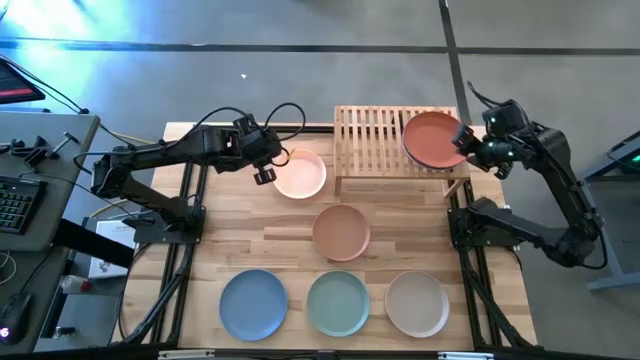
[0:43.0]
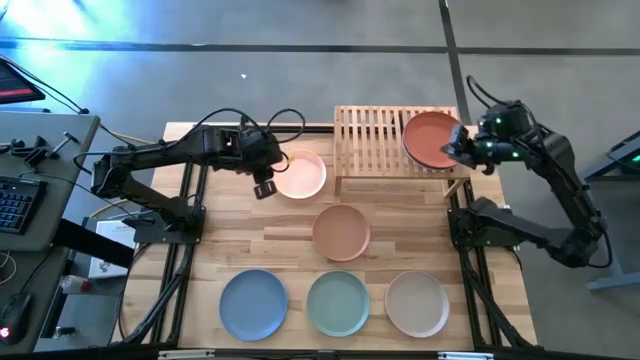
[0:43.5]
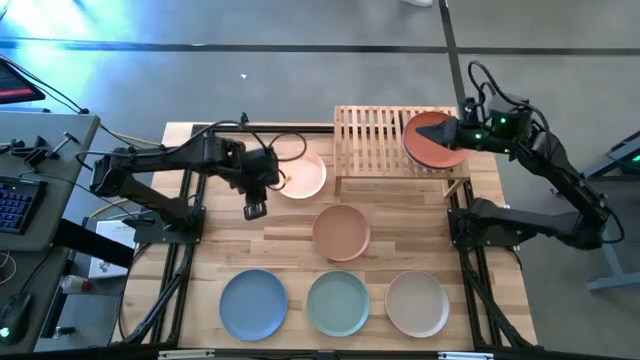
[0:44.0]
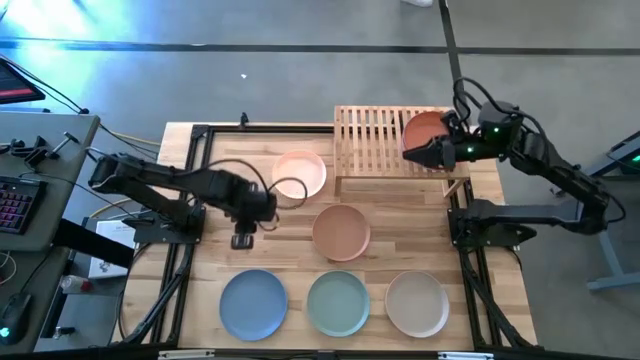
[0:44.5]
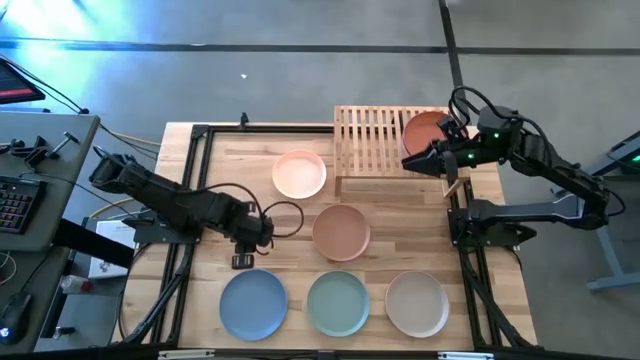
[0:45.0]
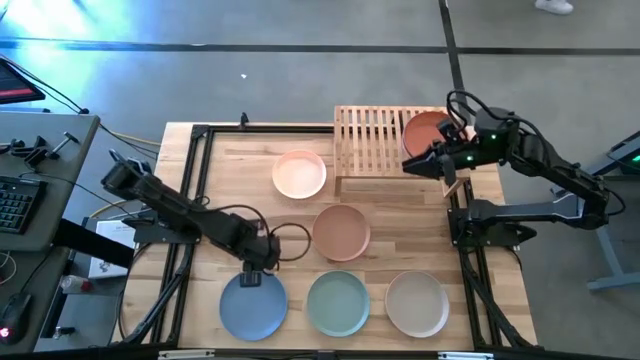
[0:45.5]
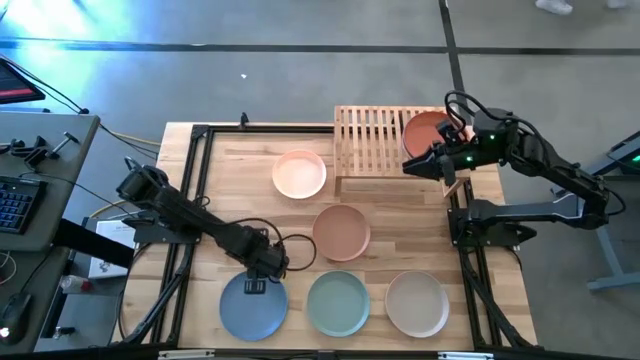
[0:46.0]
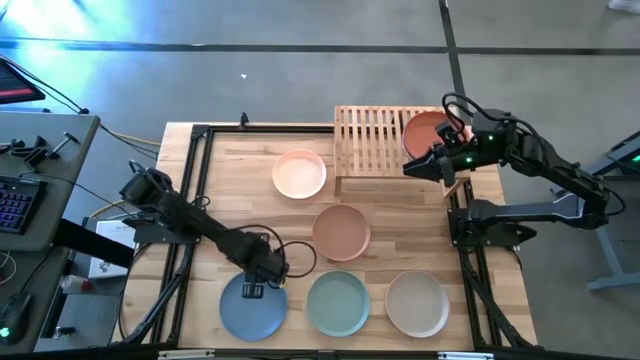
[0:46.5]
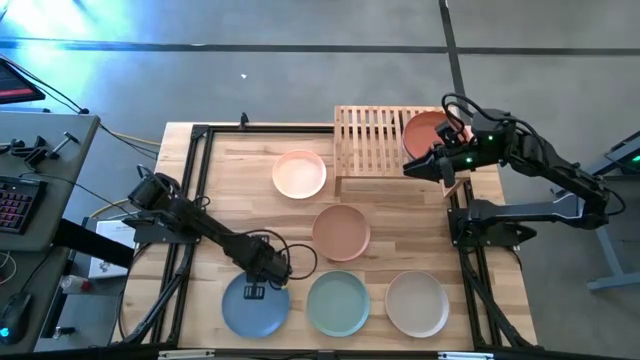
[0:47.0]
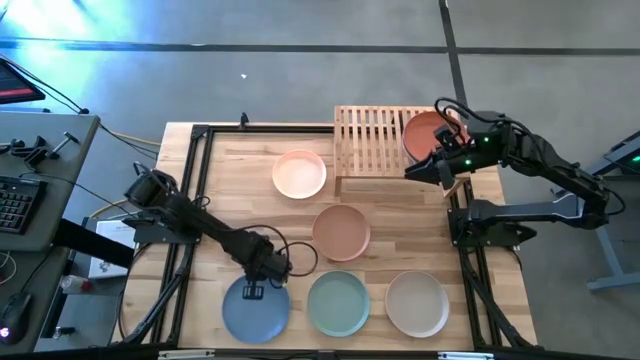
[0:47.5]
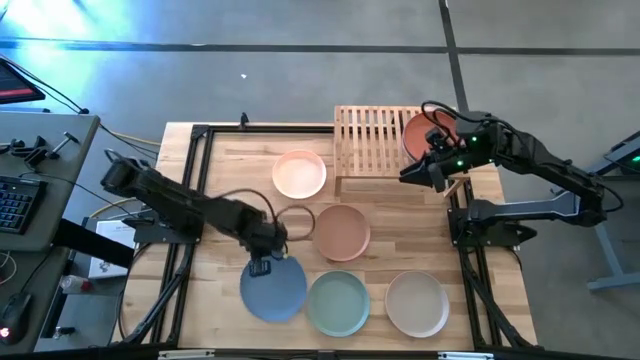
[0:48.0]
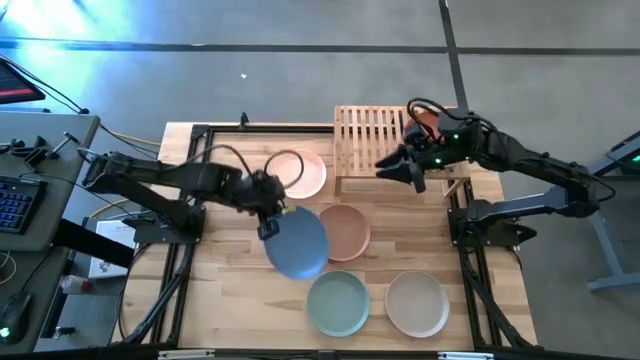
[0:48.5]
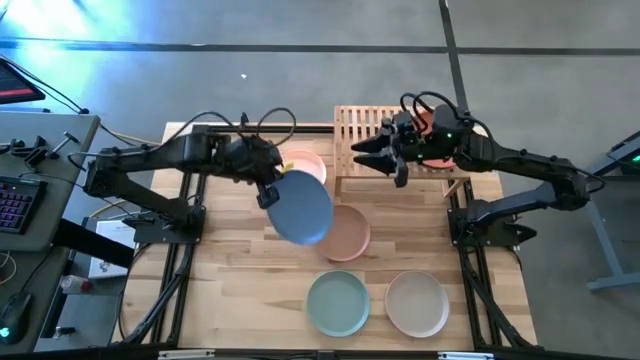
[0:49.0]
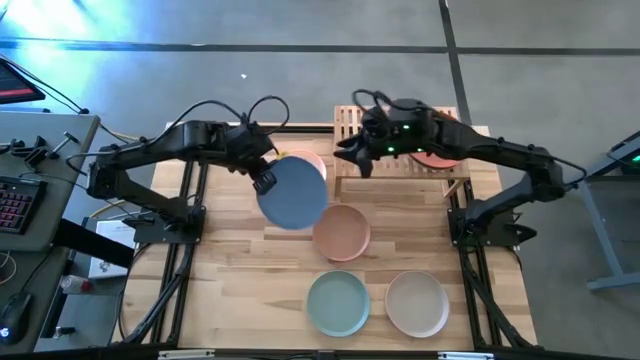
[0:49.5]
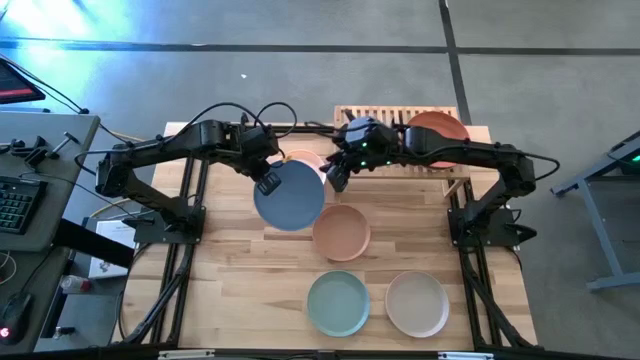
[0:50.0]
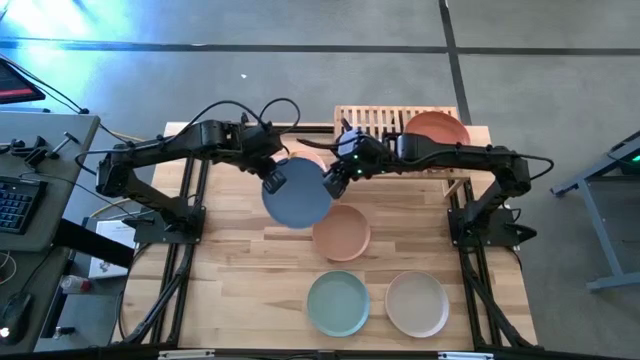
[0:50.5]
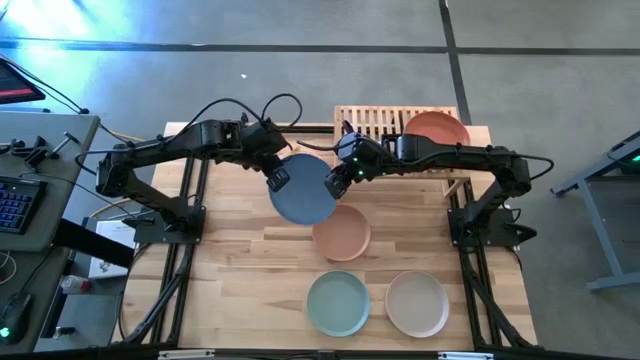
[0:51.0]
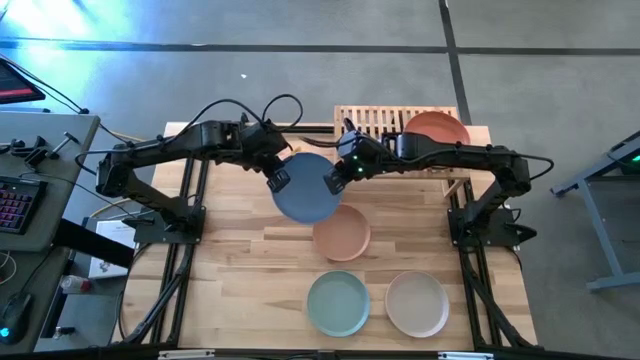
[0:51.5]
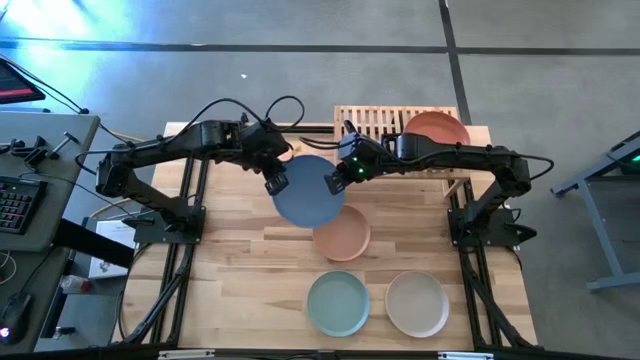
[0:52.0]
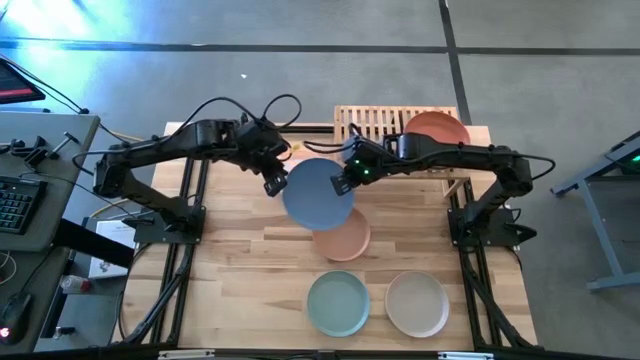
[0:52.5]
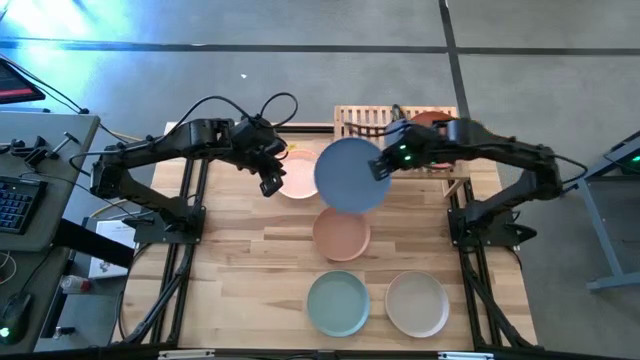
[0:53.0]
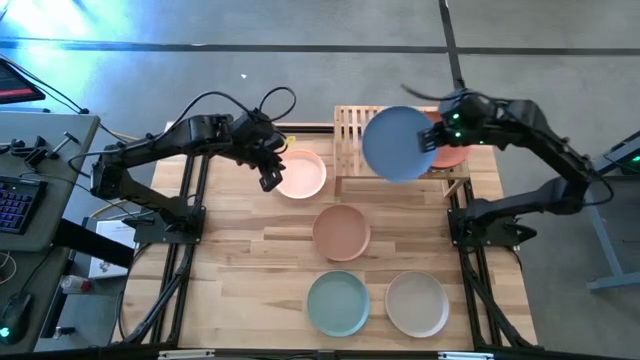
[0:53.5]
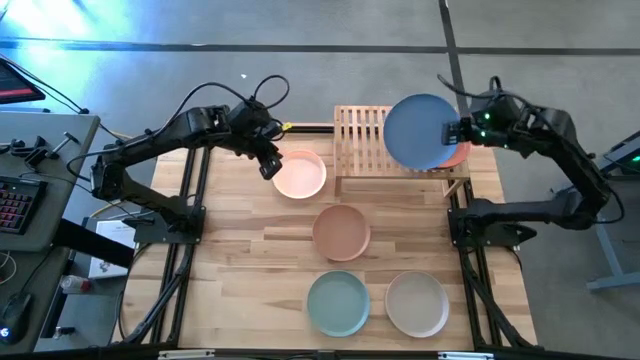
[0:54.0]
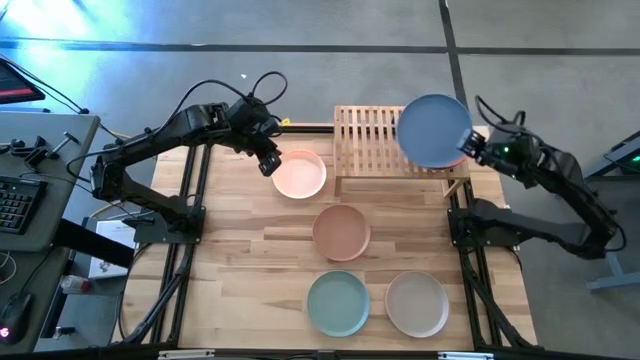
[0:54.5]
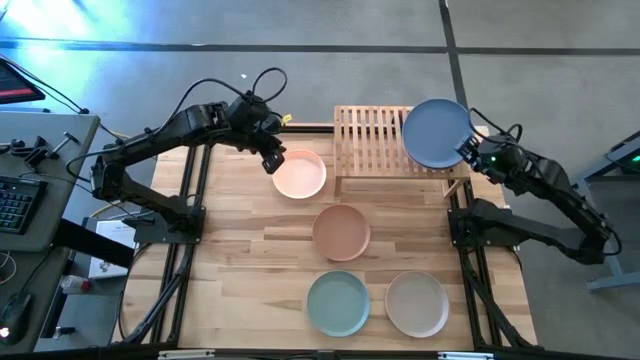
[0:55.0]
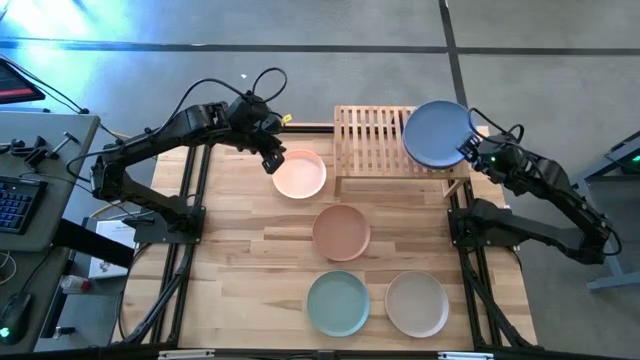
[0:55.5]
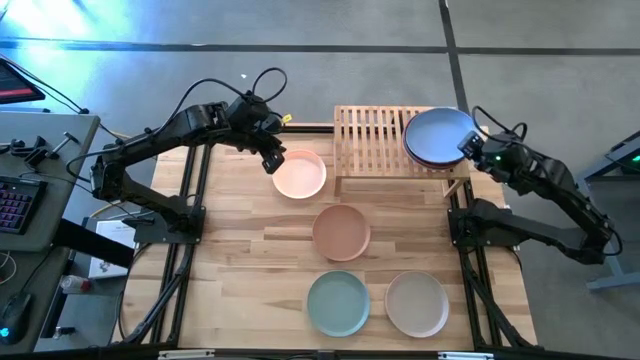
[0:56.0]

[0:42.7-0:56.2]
Task: Place and stack plates onto a shelf
Stack the blue plate on top of the orange plate on the shelf

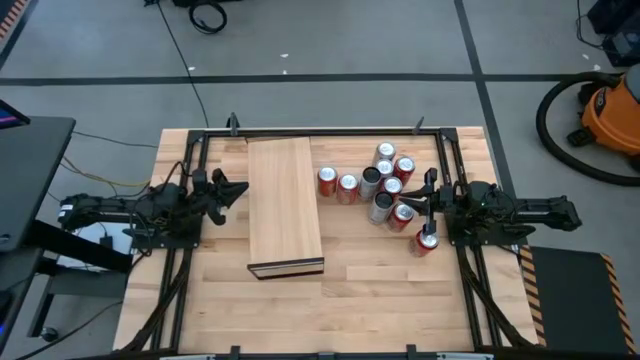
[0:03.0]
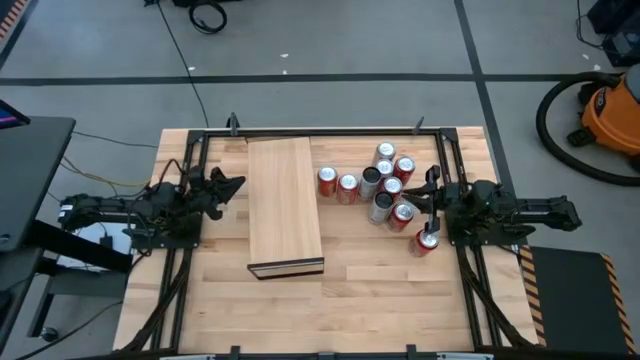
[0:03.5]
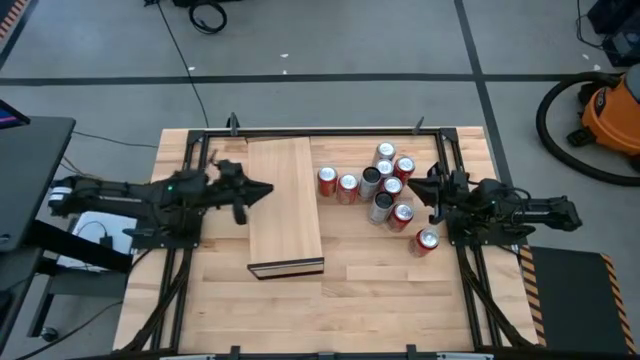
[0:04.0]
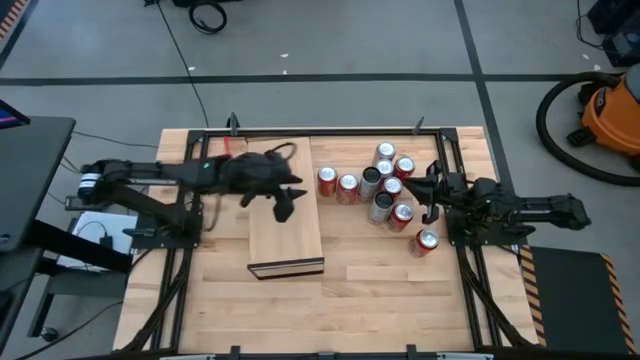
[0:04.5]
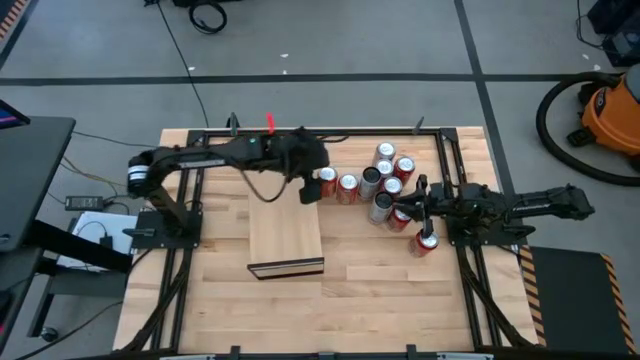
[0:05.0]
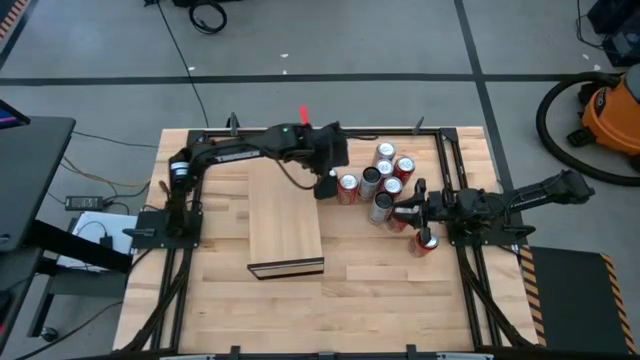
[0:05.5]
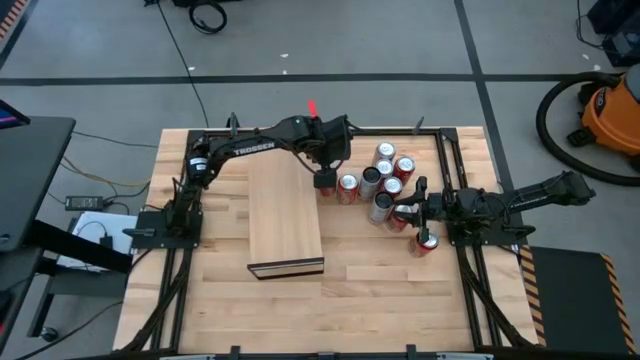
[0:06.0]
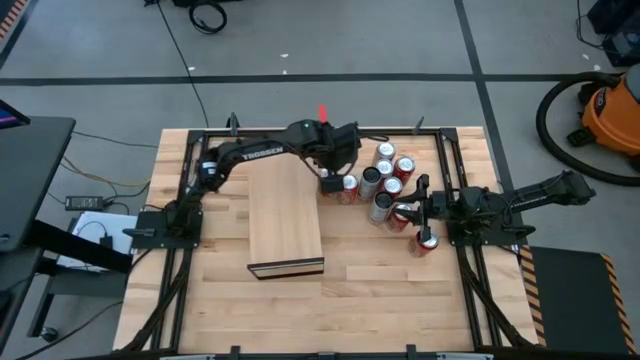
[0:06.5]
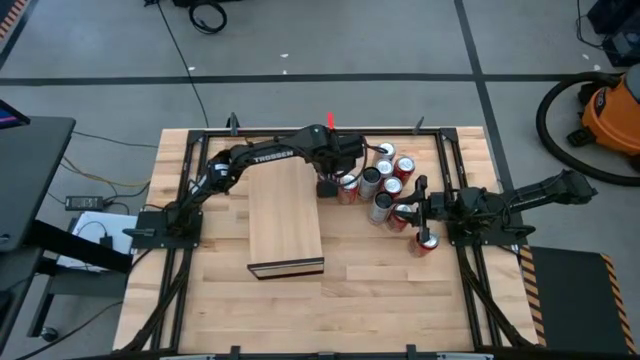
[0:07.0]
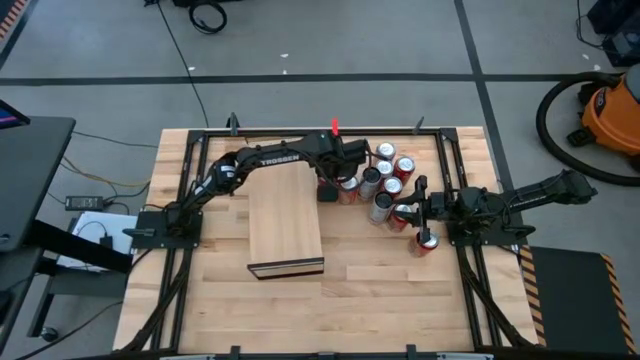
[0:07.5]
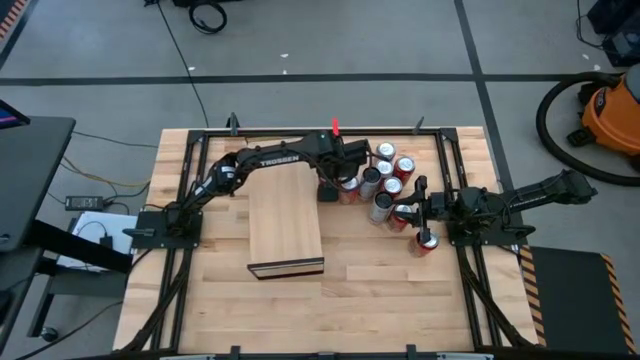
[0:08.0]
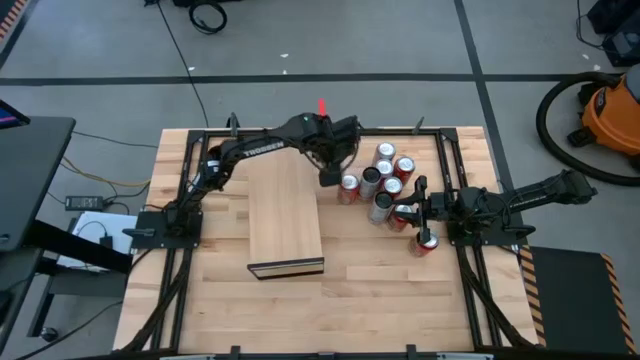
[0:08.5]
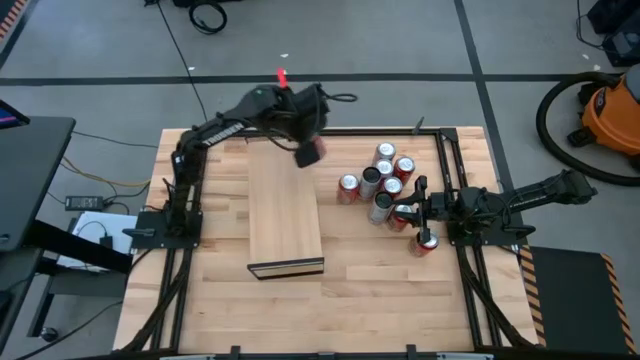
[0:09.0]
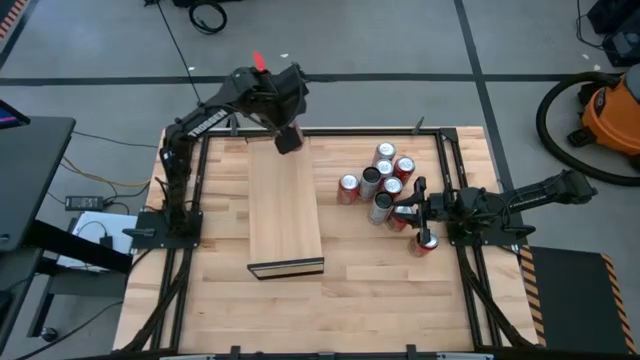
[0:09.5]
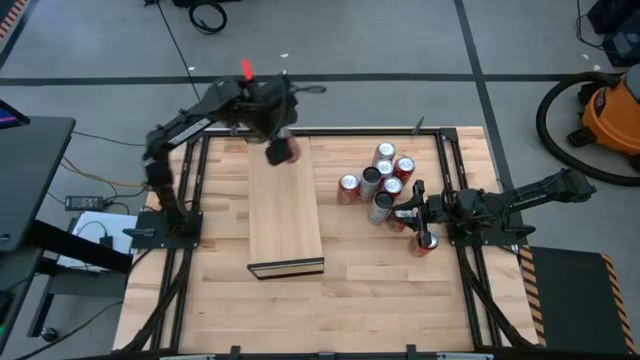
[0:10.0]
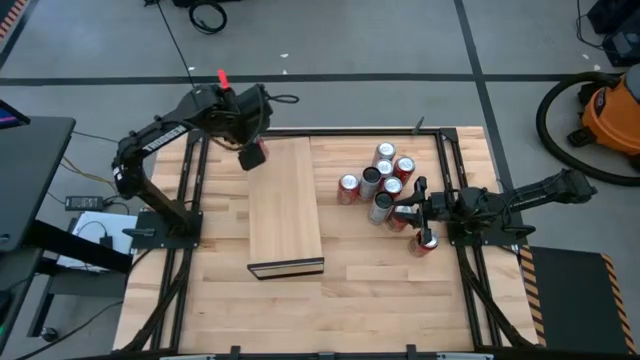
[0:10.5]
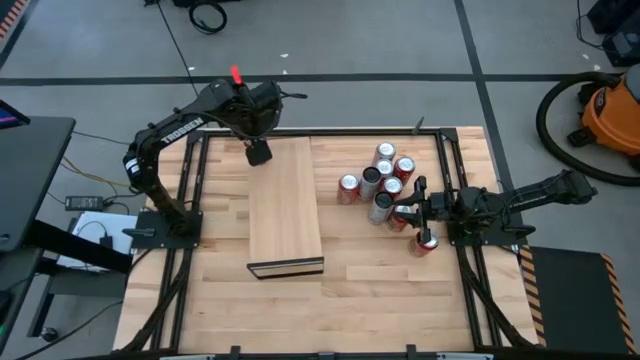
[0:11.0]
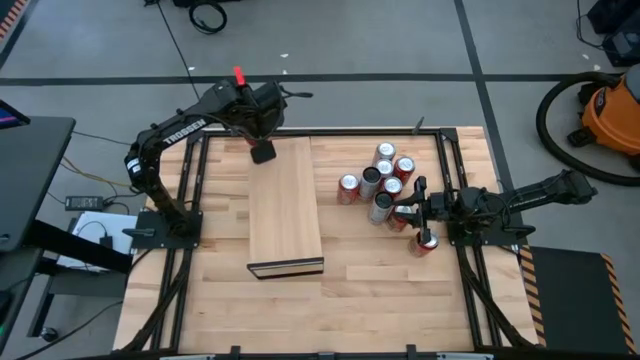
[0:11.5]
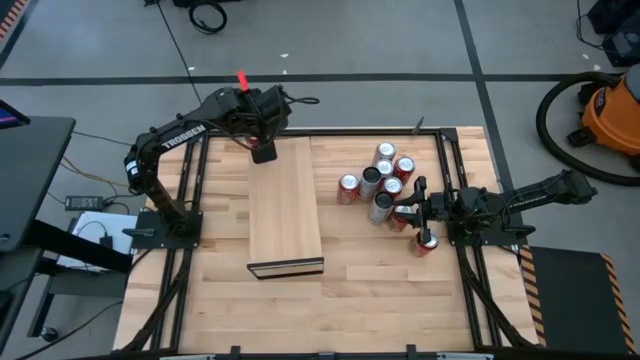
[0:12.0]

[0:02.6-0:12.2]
Task: Place canned beverage on shelf
Put the left orange soda can on the shelf
